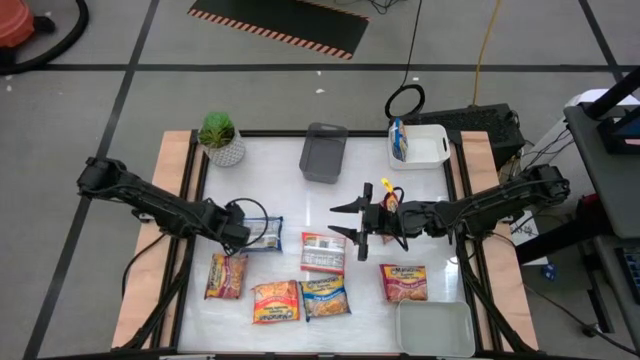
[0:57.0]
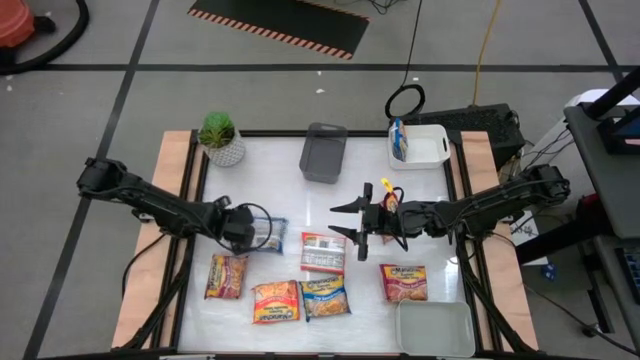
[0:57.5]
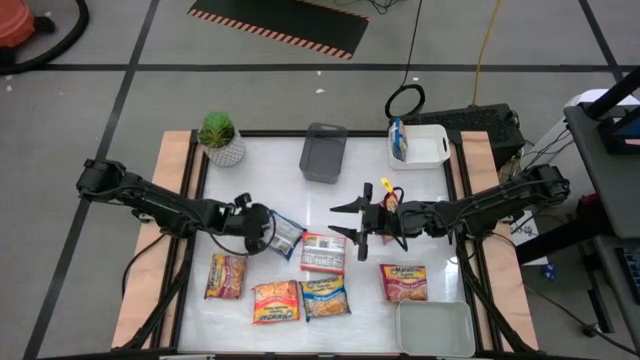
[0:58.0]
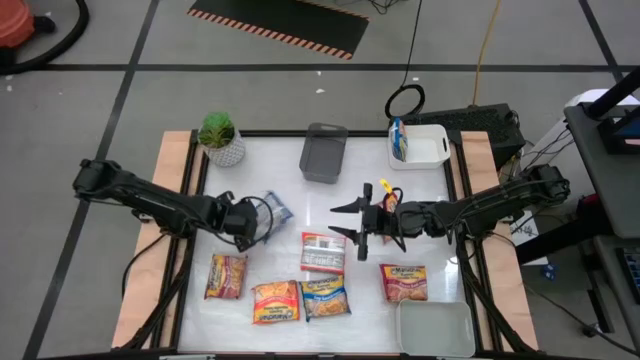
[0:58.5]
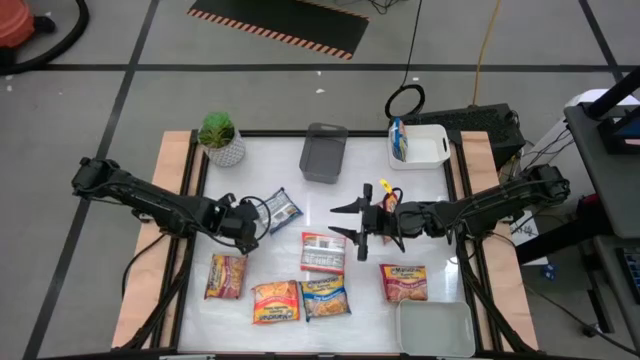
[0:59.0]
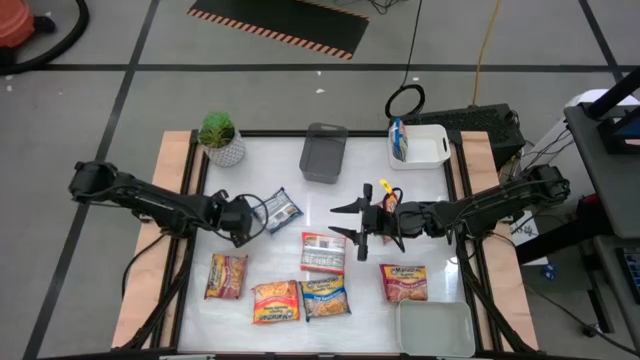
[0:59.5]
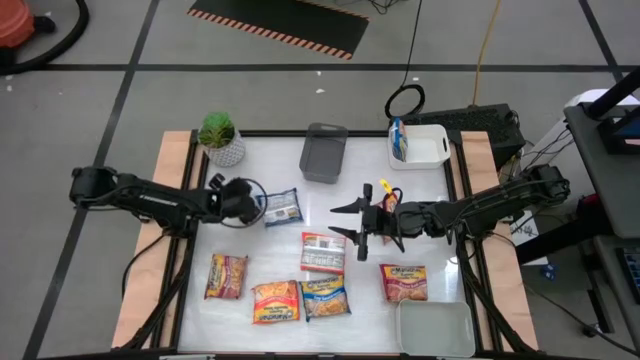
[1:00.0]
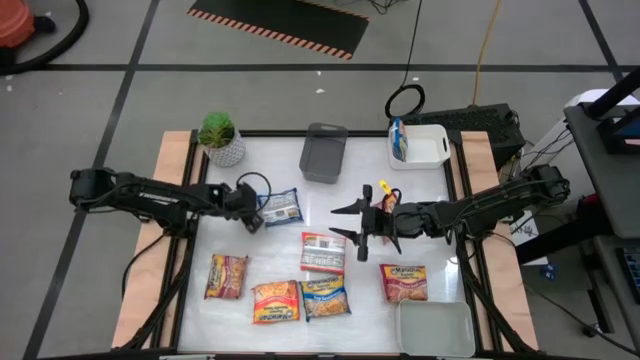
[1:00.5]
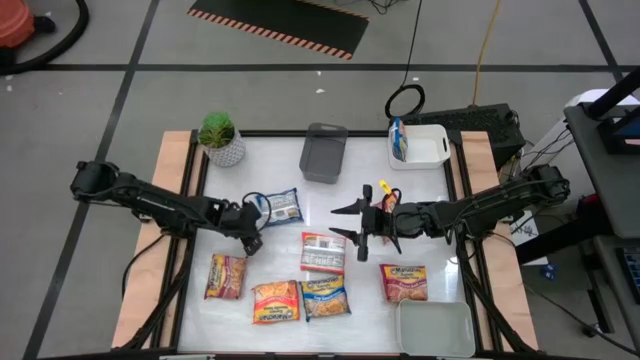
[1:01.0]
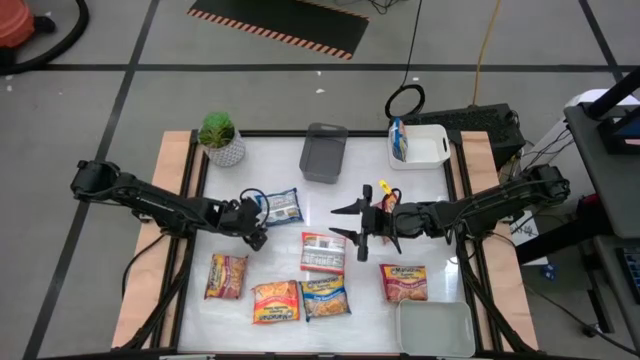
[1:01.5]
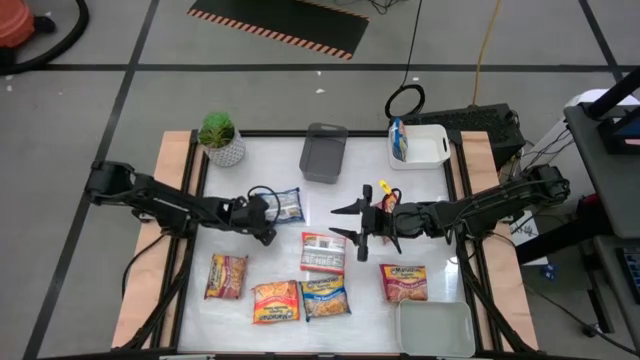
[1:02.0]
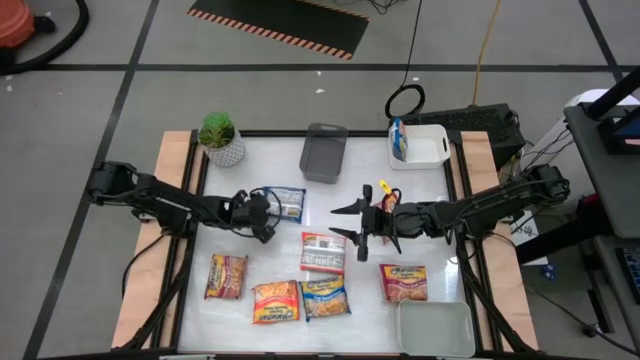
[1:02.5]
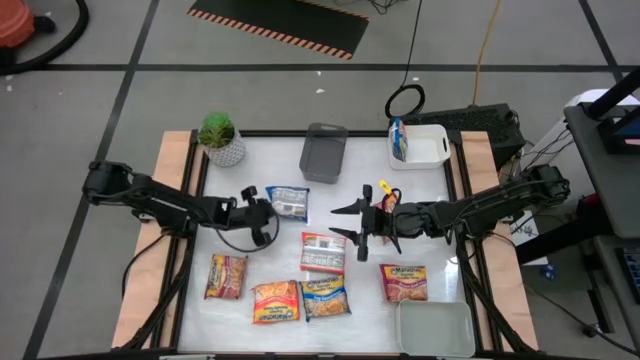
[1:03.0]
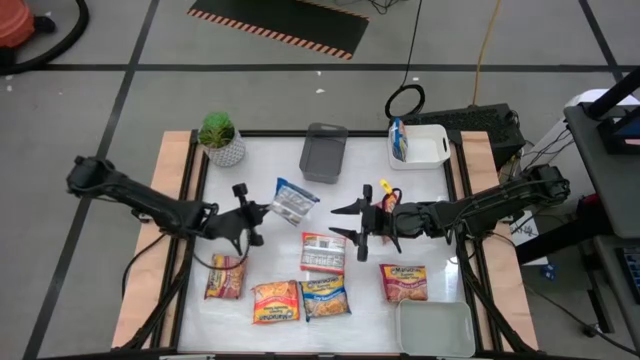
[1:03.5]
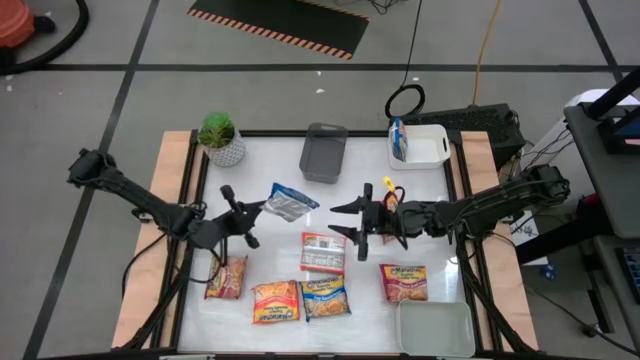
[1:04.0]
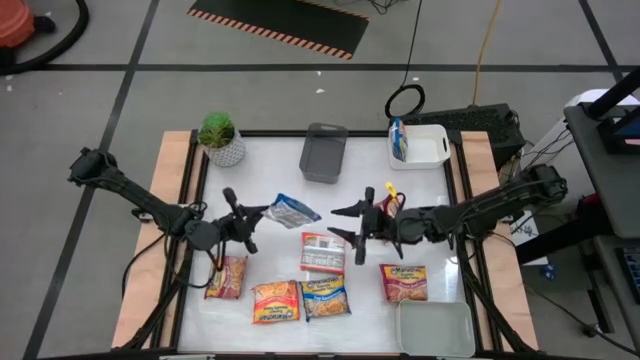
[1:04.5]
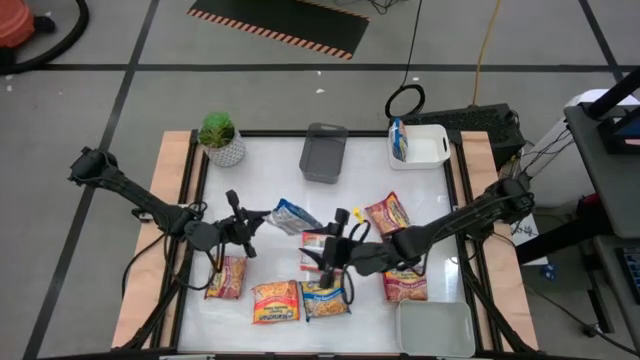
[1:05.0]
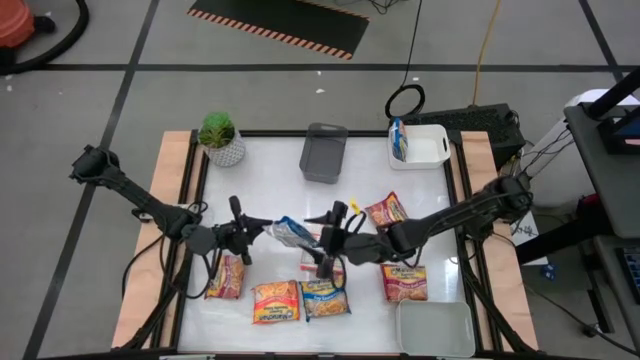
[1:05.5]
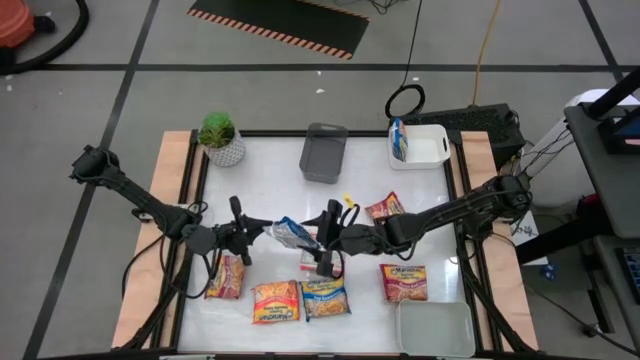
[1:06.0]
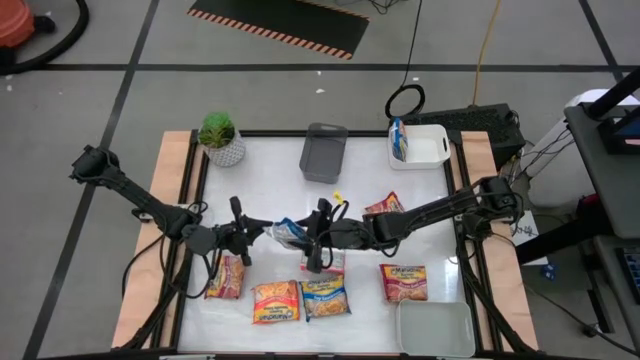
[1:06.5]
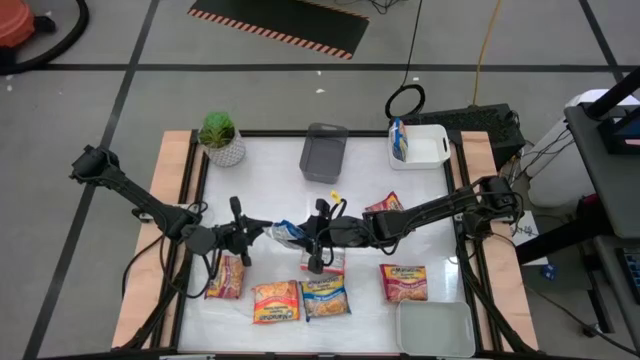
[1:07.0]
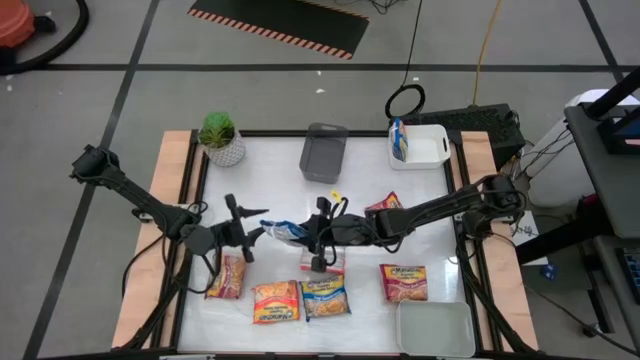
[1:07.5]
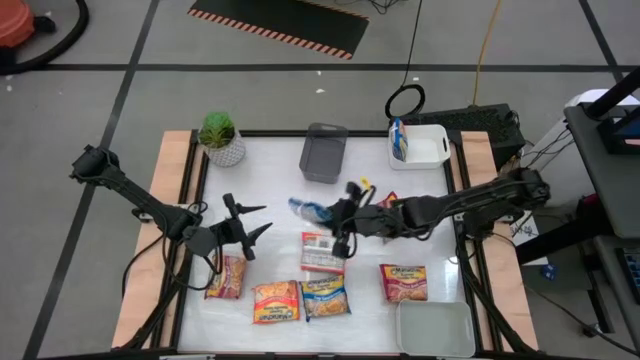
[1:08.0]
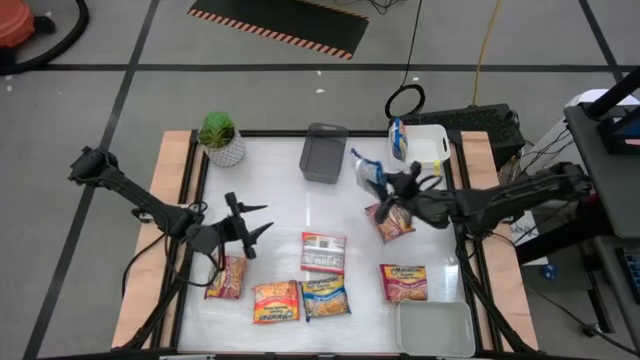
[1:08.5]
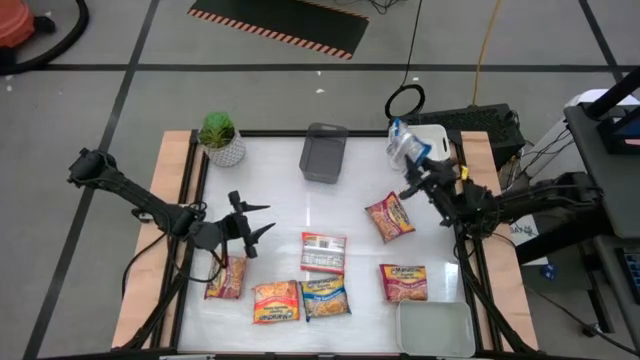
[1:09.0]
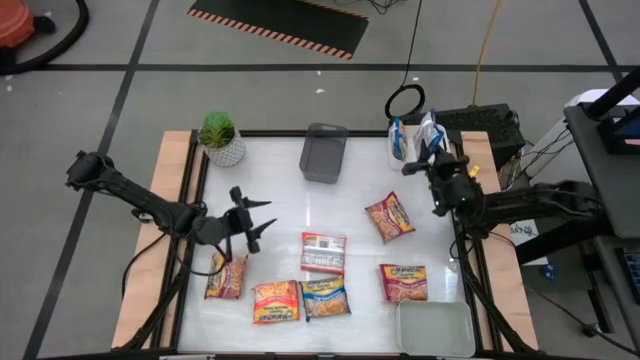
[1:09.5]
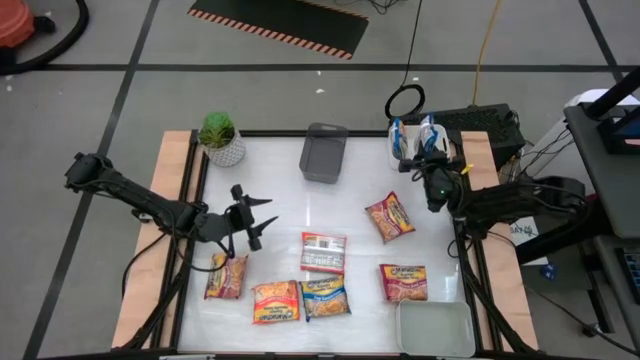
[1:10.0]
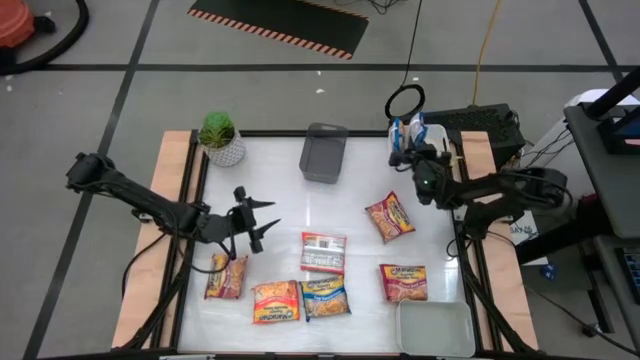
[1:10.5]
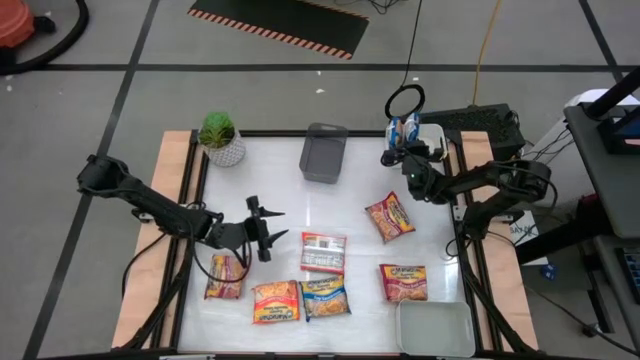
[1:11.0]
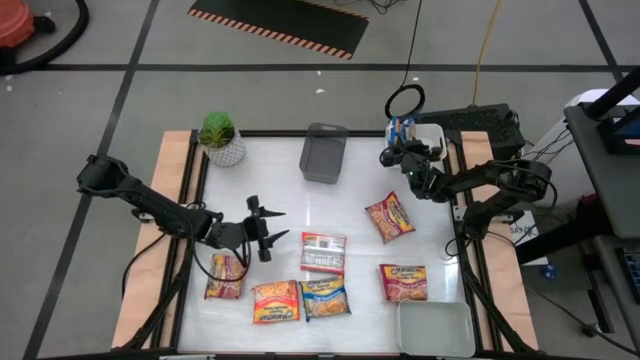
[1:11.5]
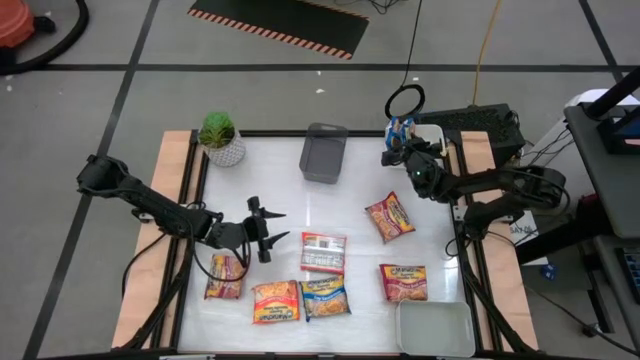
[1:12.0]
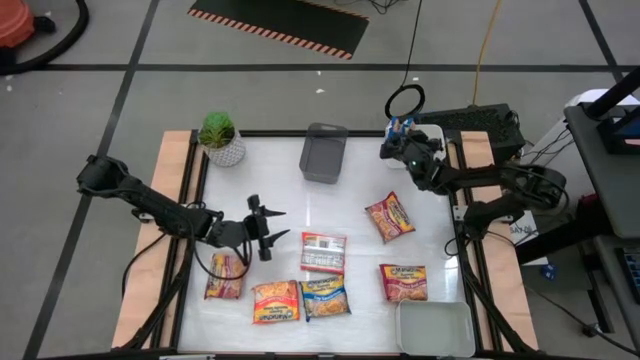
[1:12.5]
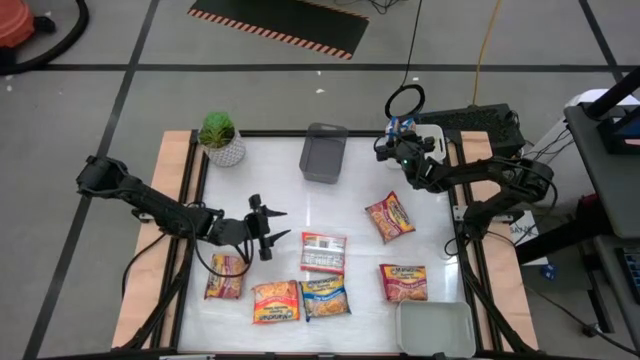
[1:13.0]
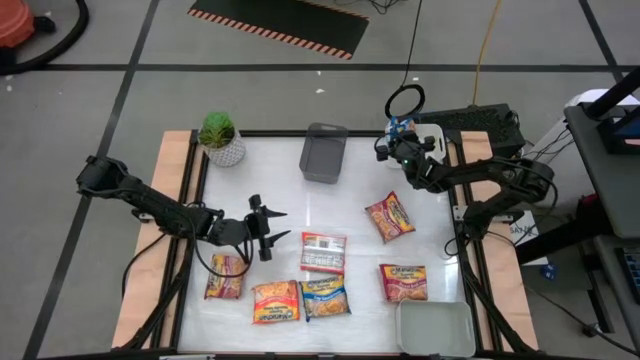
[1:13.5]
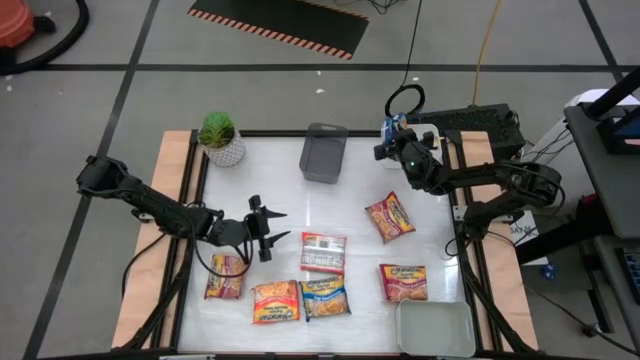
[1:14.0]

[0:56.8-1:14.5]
Task: Sort Maruchan noodles
Put the top blue noodle pack into the white bin

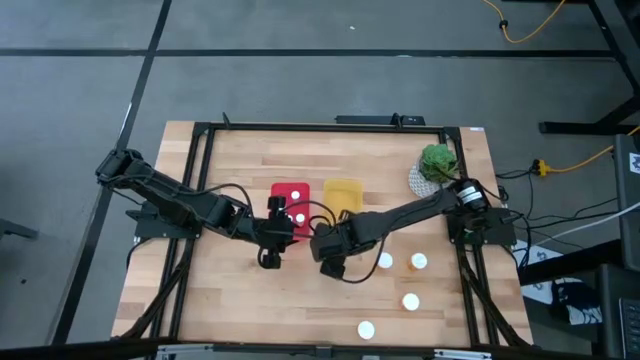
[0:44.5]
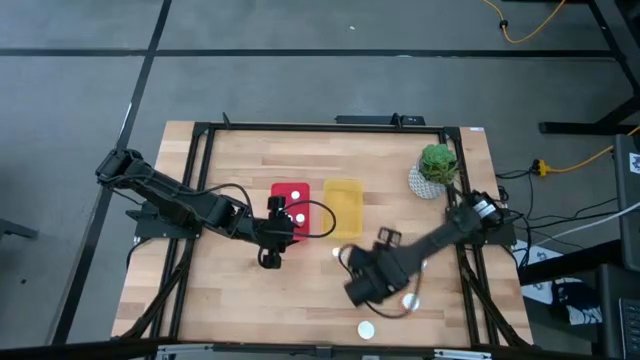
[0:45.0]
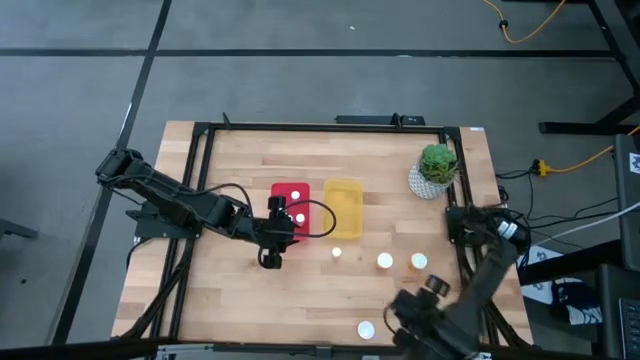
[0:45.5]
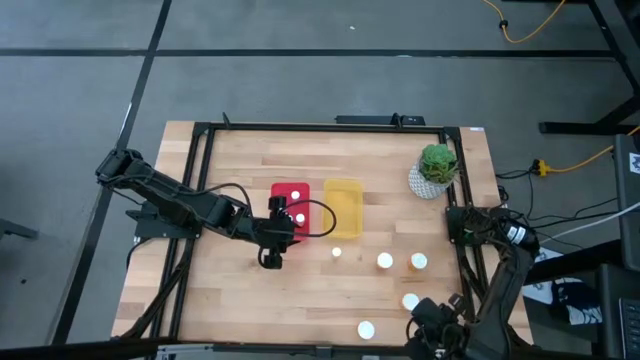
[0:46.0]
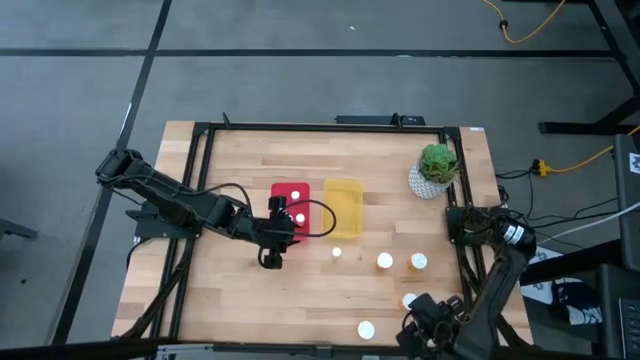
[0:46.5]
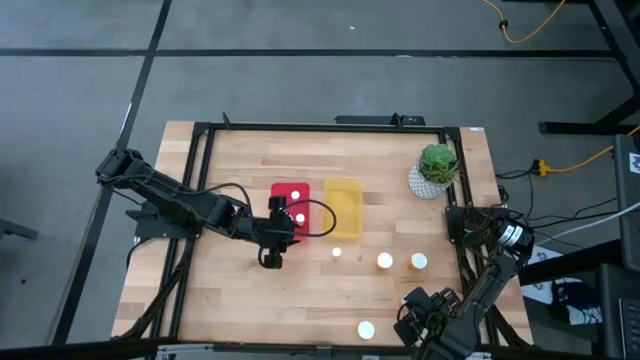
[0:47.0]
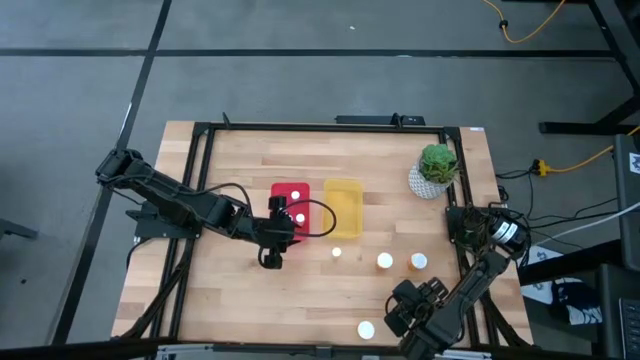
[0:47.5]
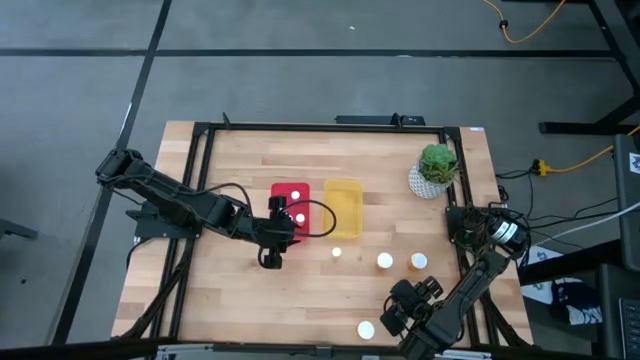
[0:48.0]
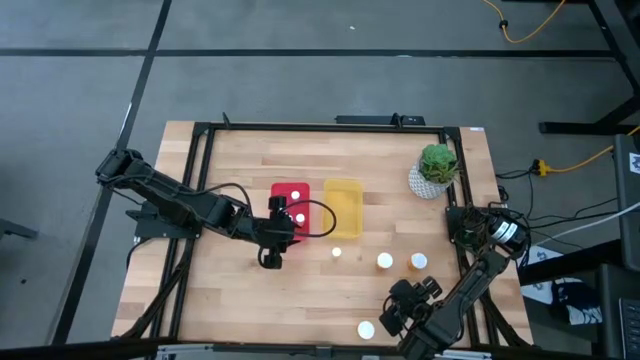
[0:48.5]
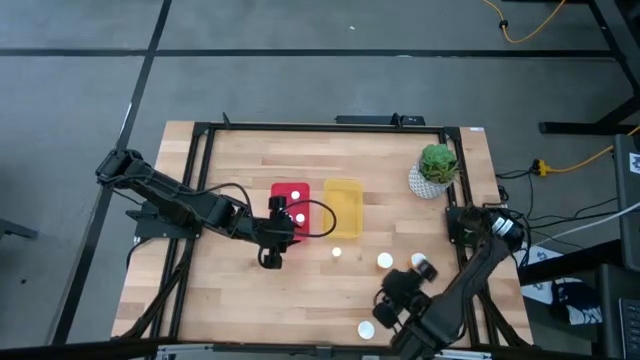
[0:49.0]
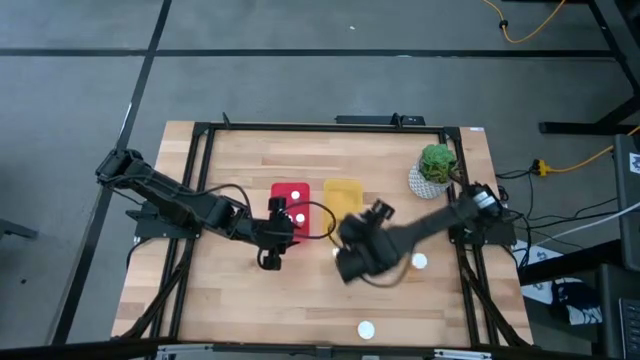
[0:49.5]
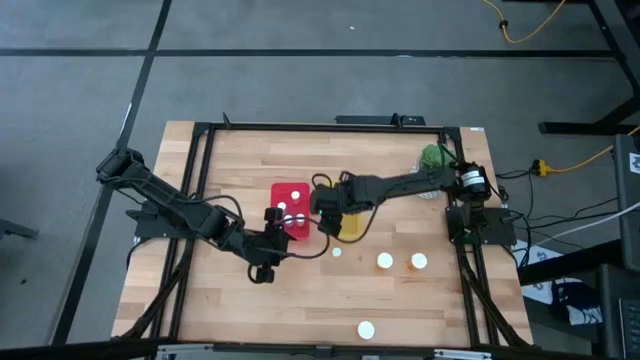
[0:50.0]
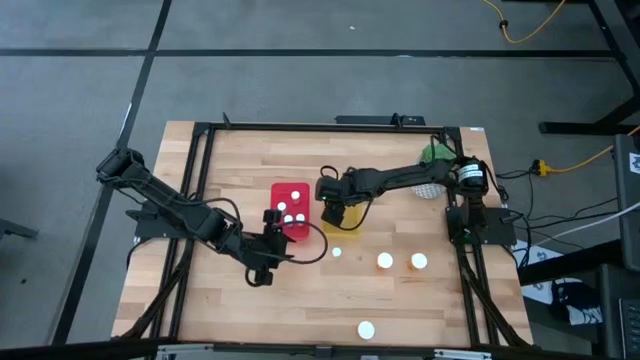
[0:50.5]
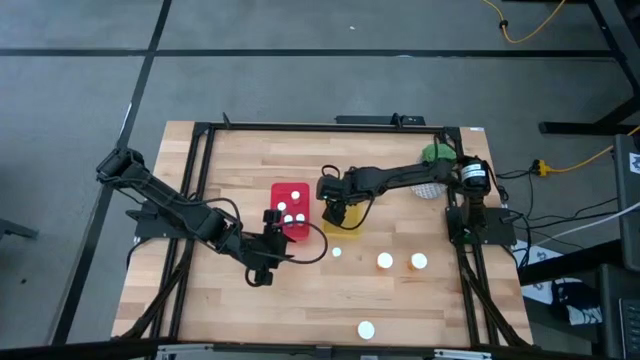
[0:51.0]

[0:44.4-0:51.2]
Task: Pick and place medicine bottles into bin by pill shape (circle, oval)
Put the large orange pill bottle into the yellow bin
